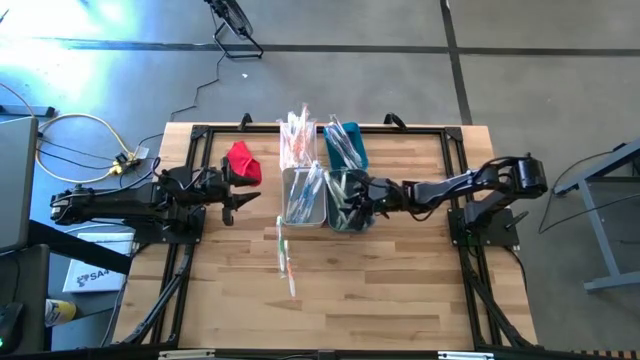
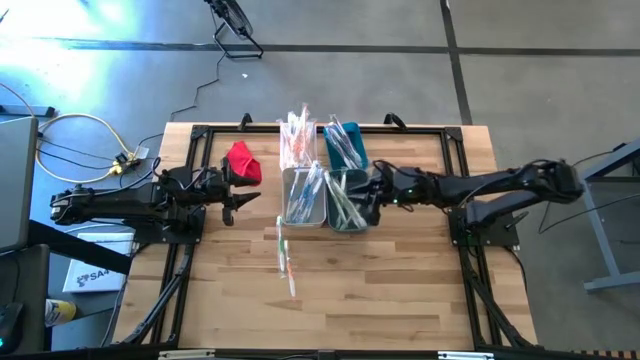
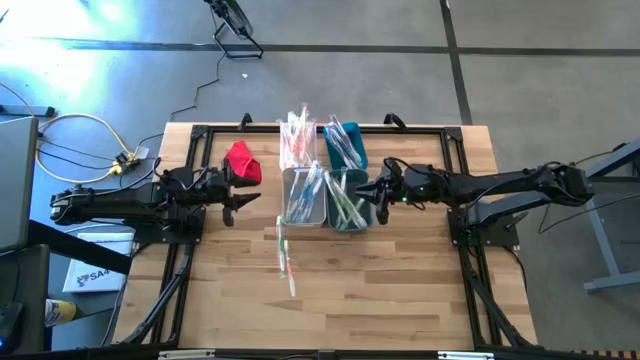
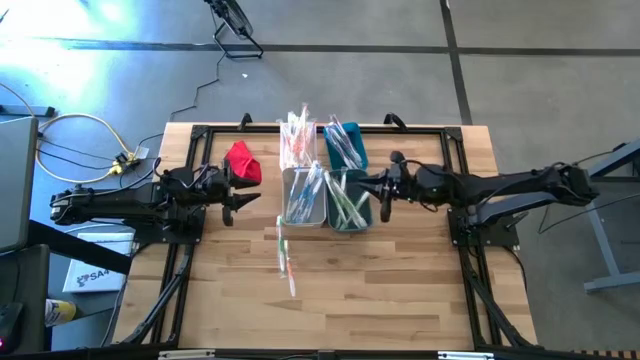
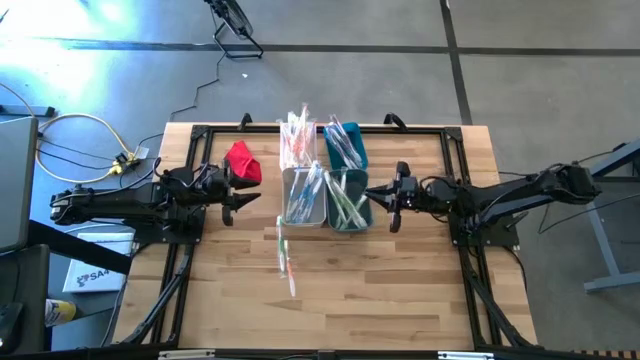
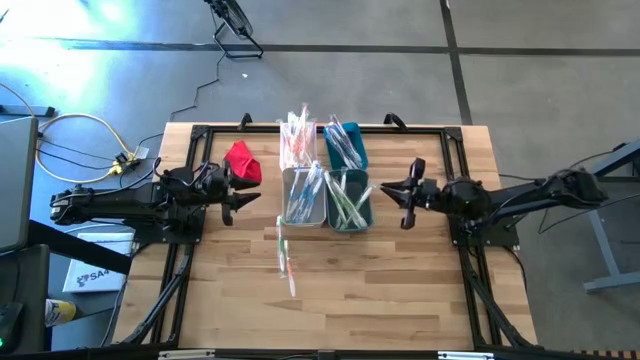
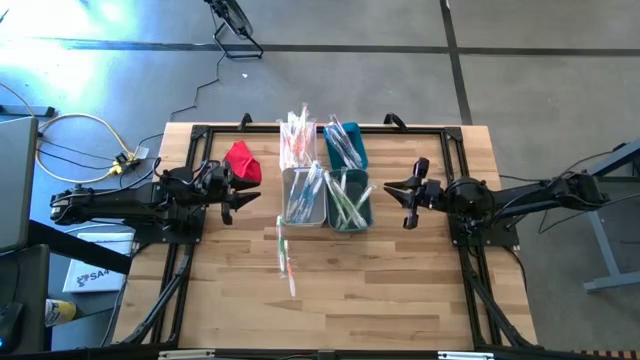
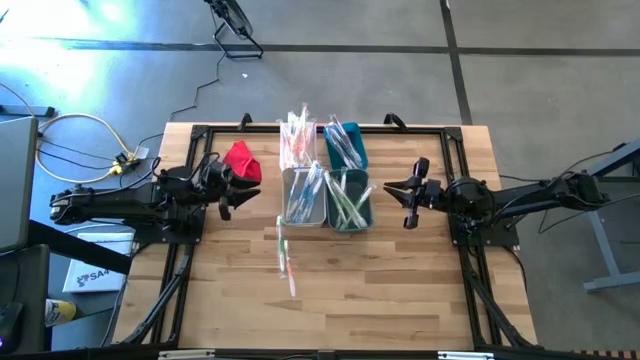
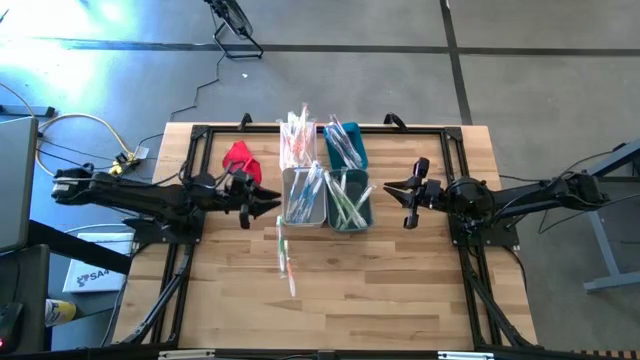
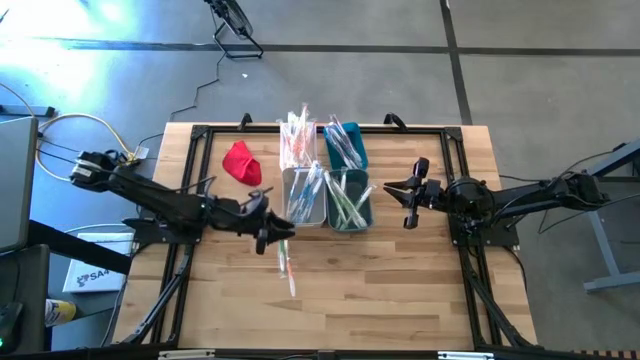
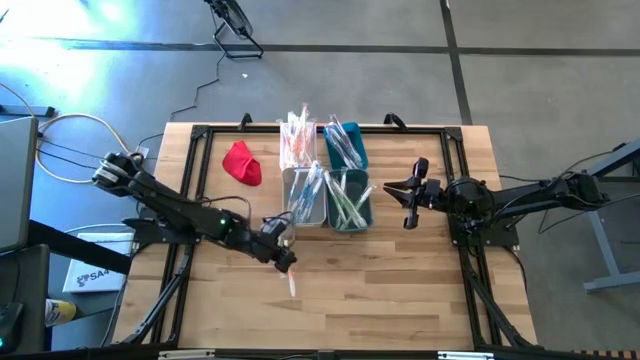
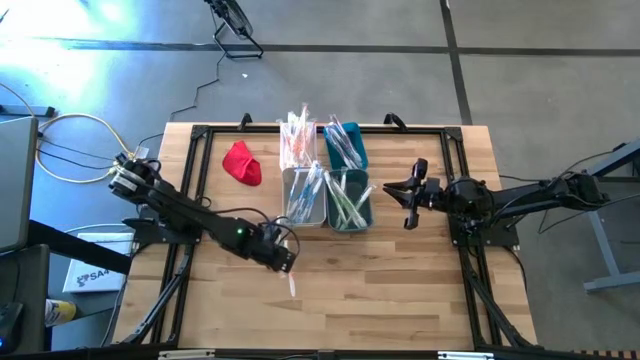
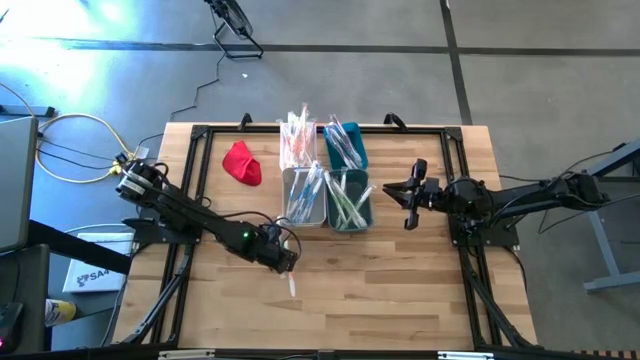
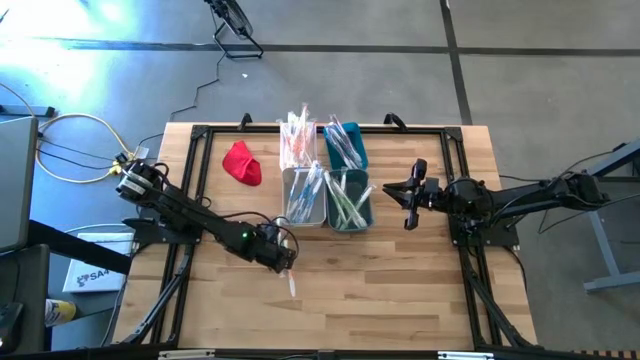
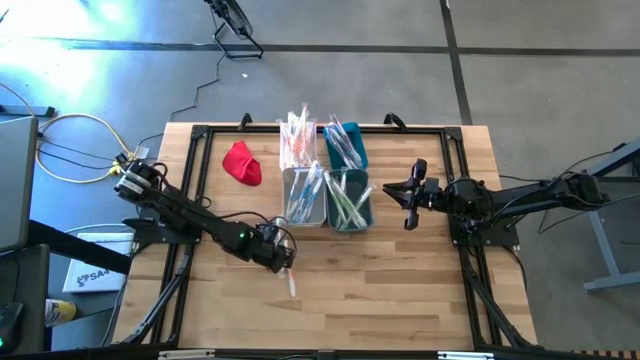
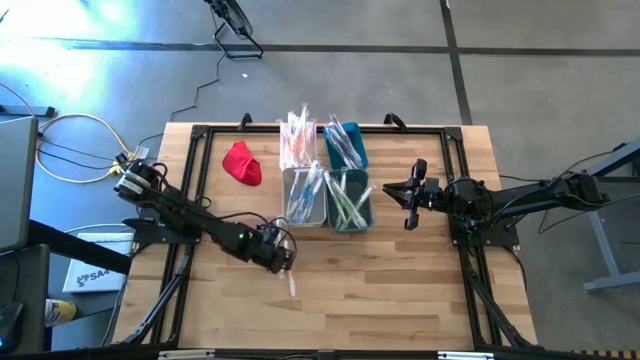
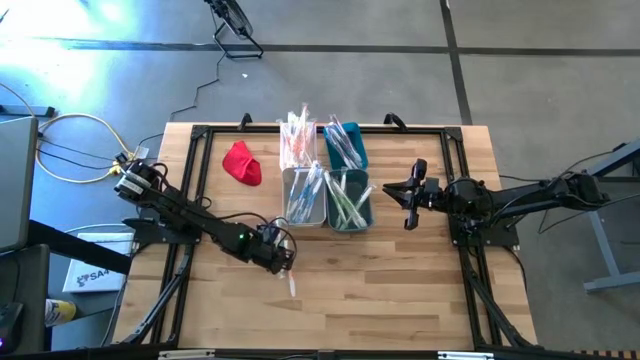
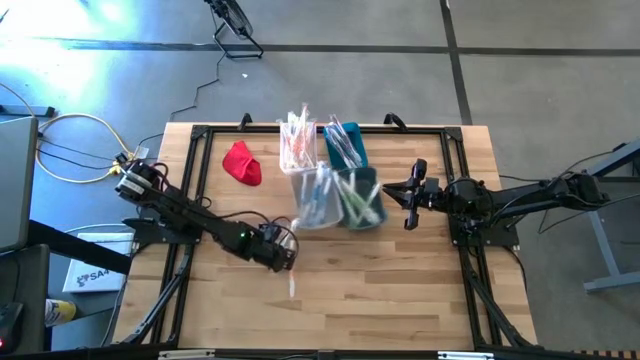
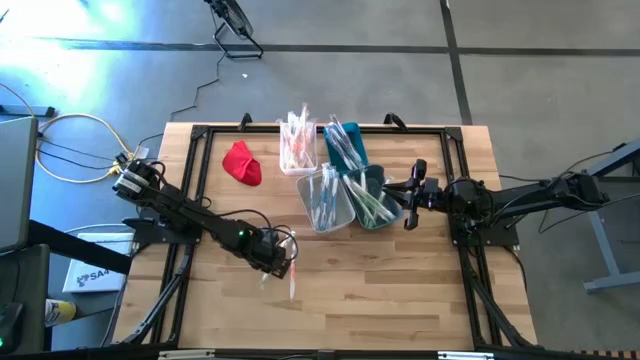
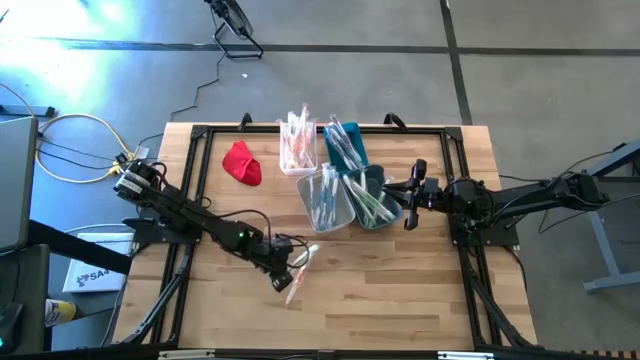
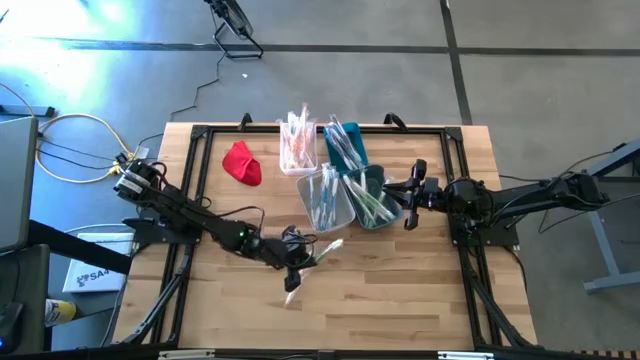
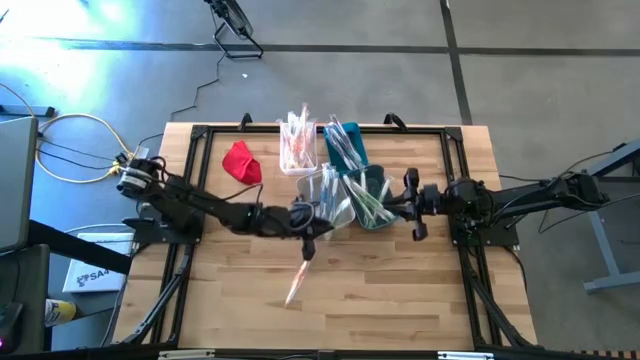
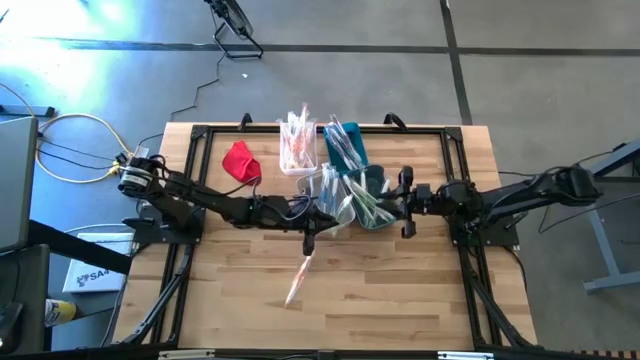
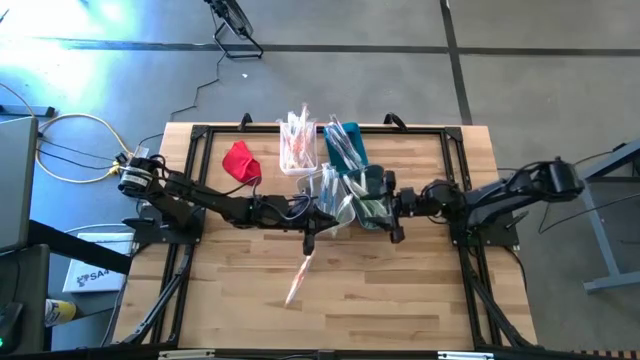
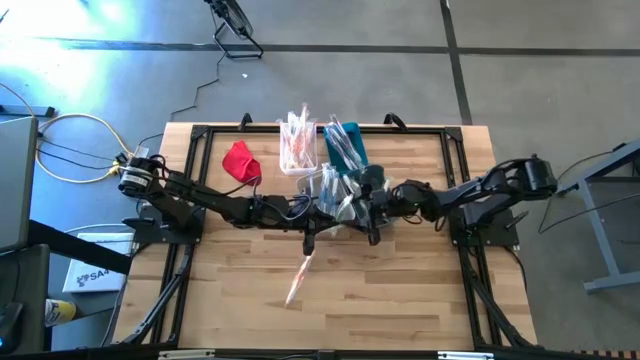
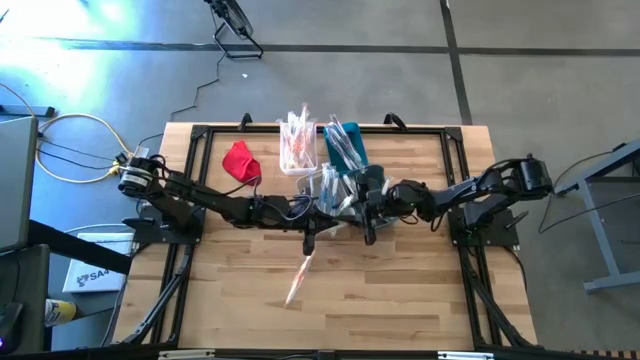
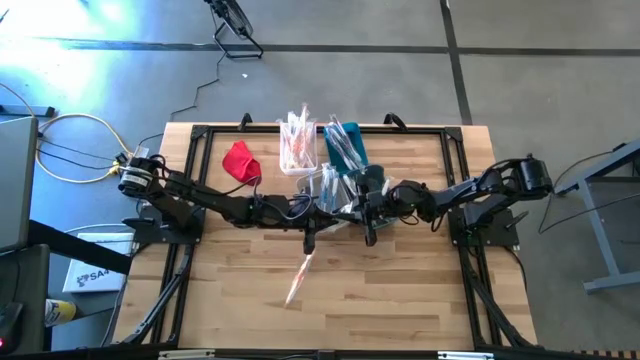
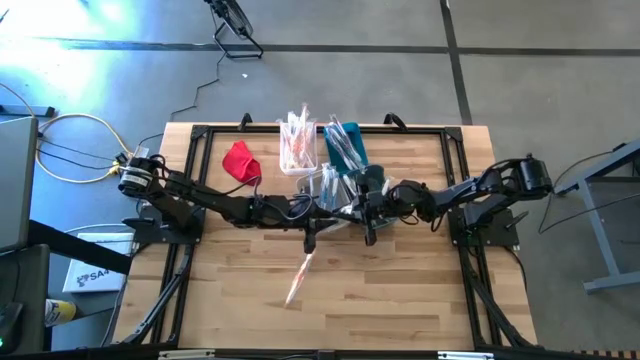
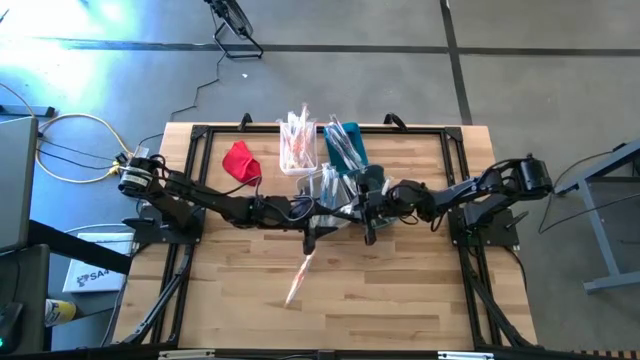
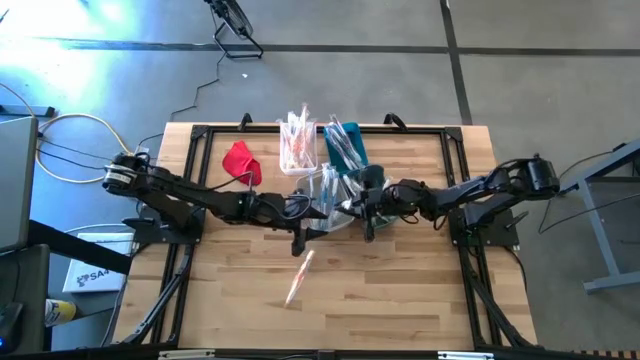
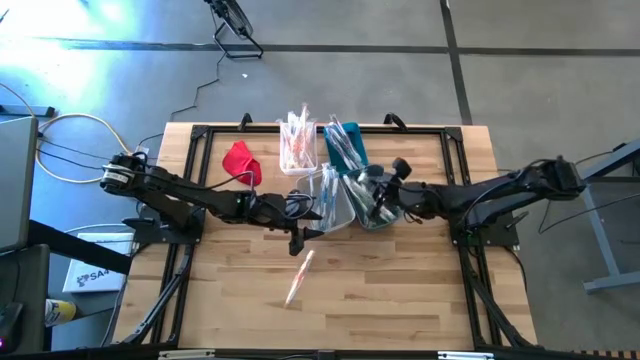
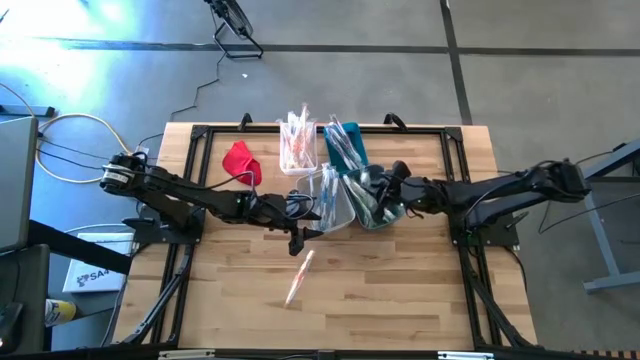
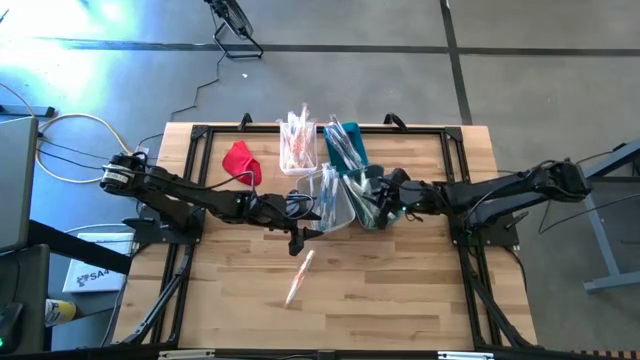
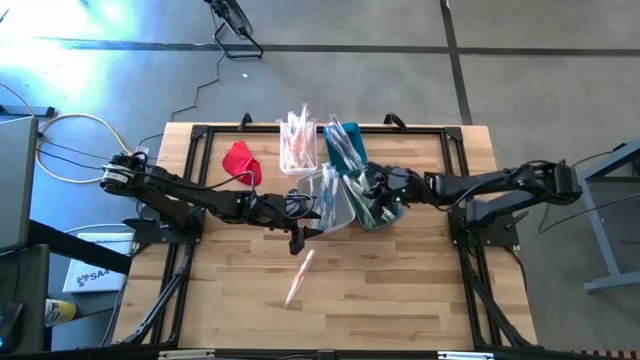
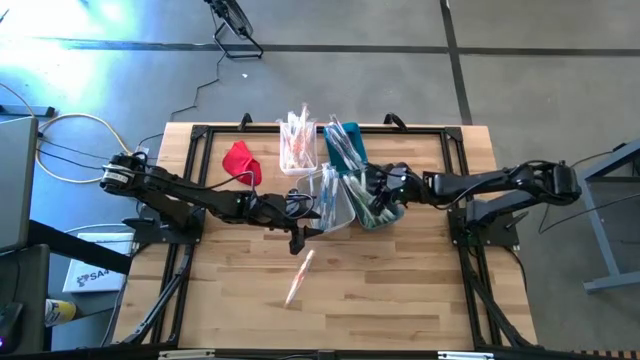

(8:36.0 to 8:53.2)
Task: Pick & Place Toothbrushes
Put the green toothbrush into the blue bin
